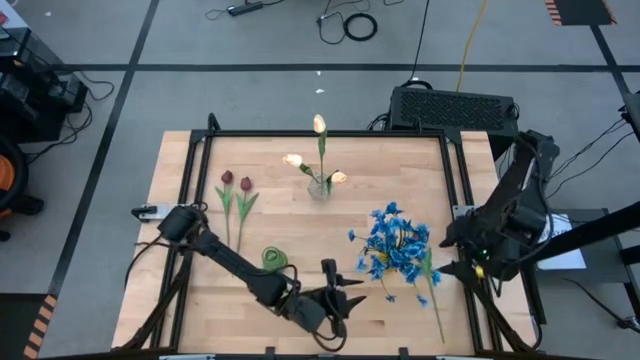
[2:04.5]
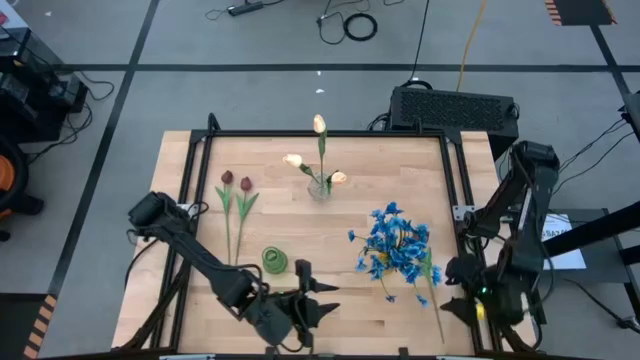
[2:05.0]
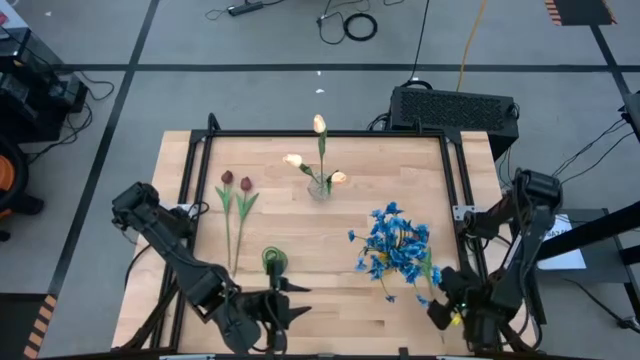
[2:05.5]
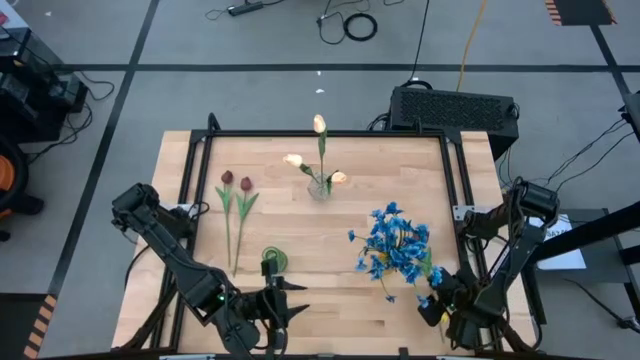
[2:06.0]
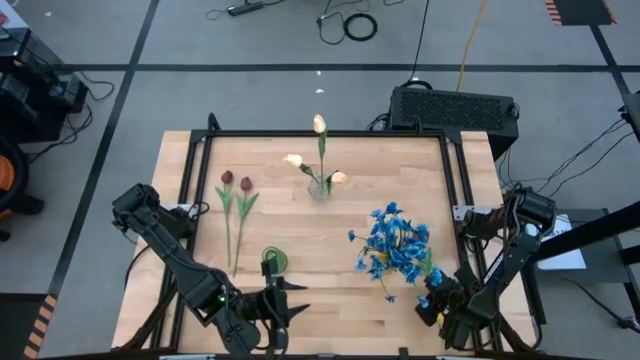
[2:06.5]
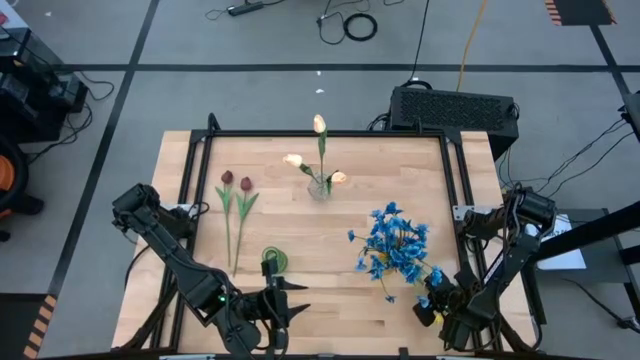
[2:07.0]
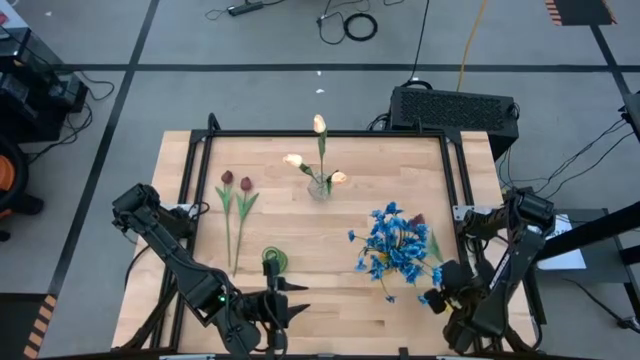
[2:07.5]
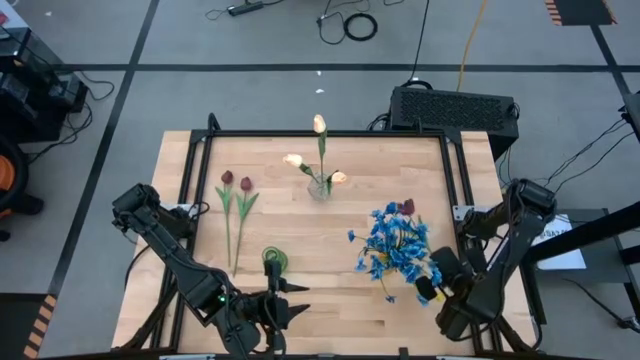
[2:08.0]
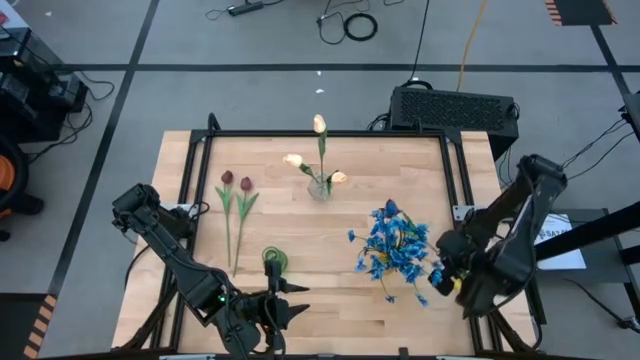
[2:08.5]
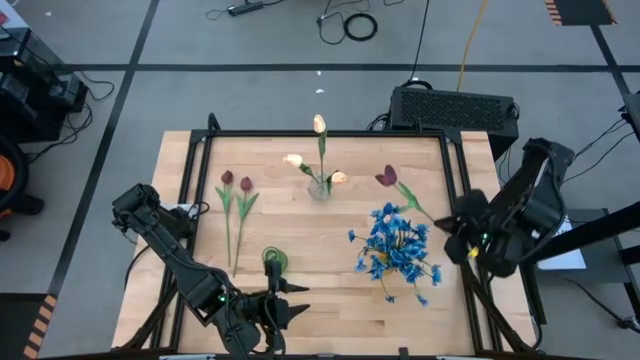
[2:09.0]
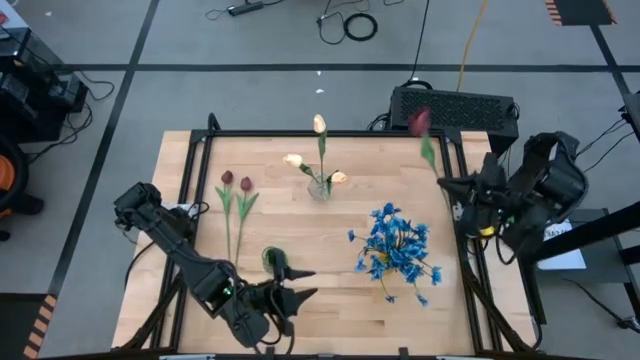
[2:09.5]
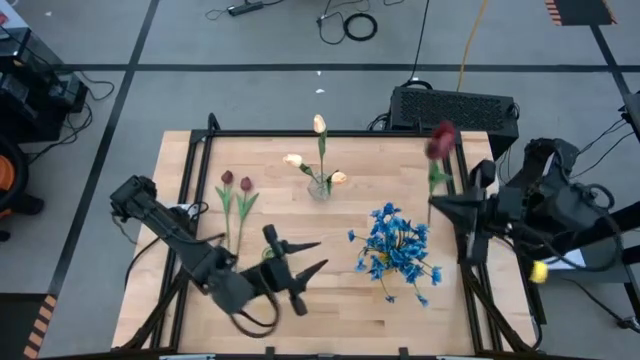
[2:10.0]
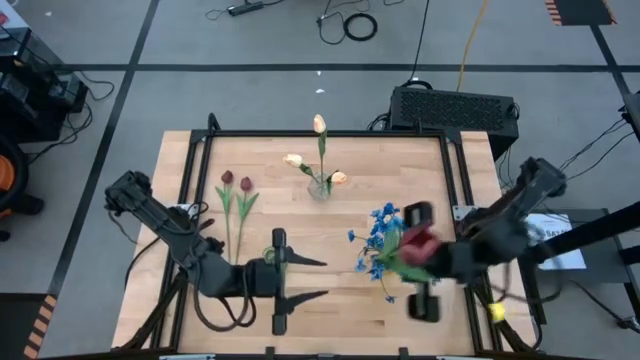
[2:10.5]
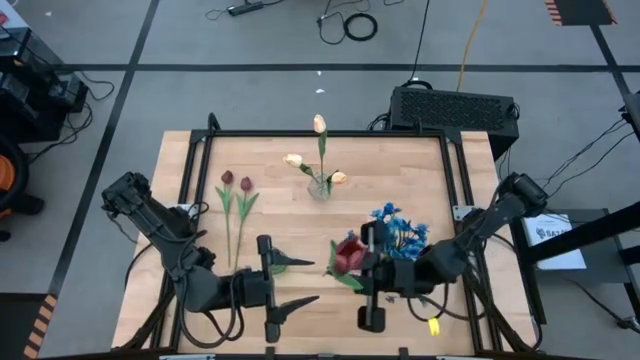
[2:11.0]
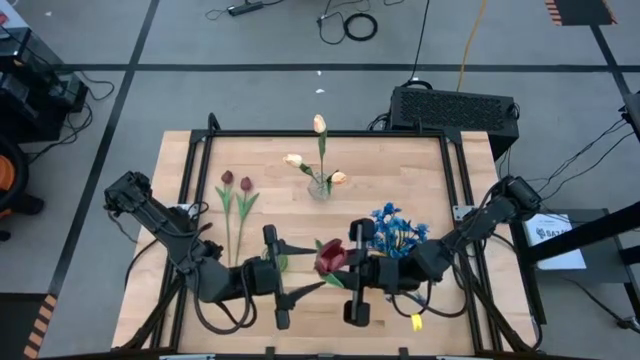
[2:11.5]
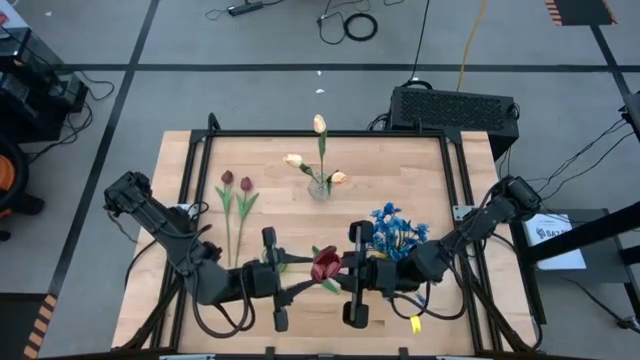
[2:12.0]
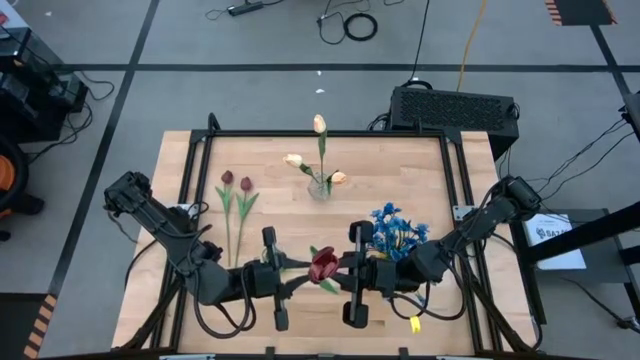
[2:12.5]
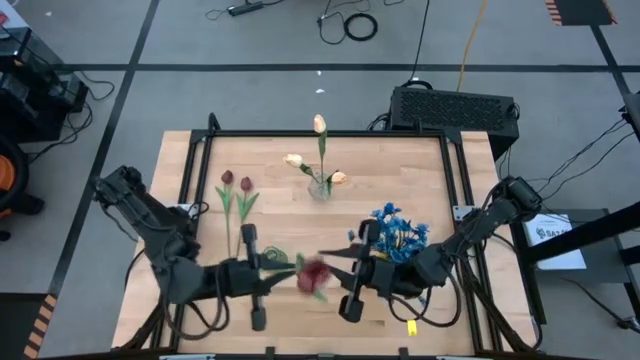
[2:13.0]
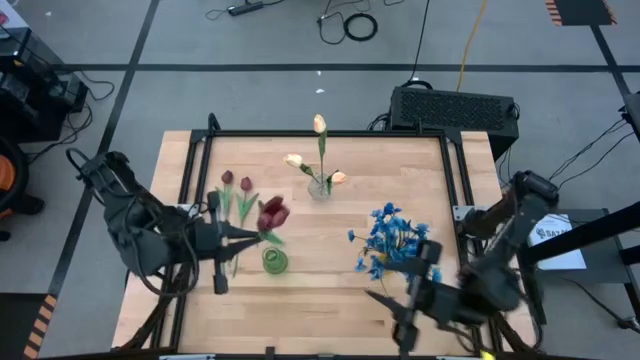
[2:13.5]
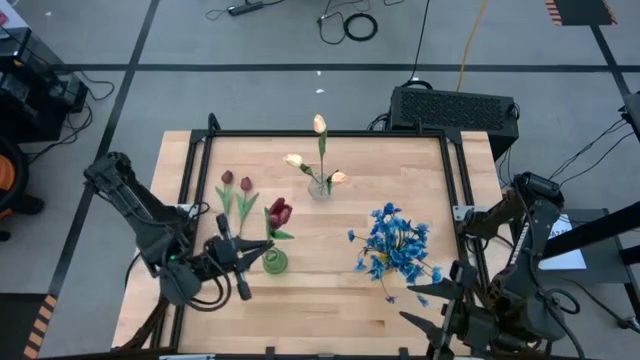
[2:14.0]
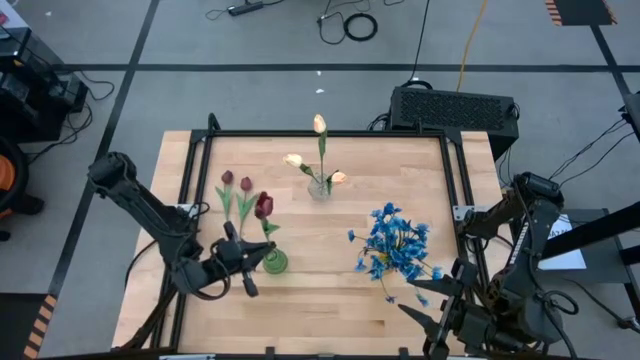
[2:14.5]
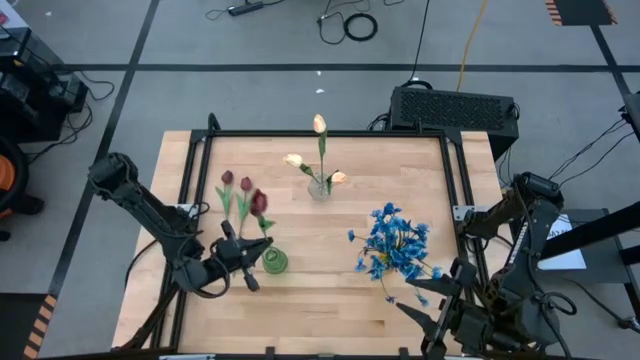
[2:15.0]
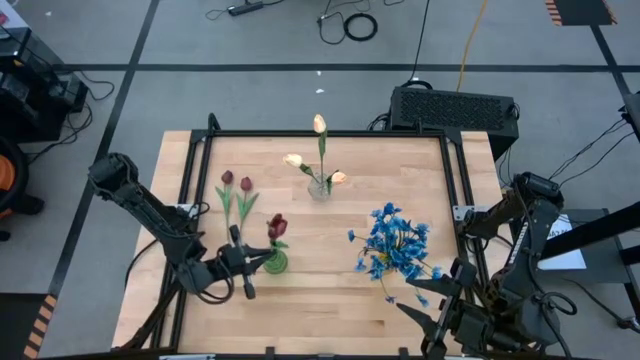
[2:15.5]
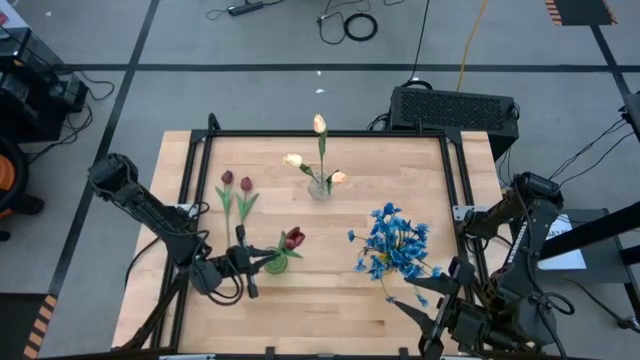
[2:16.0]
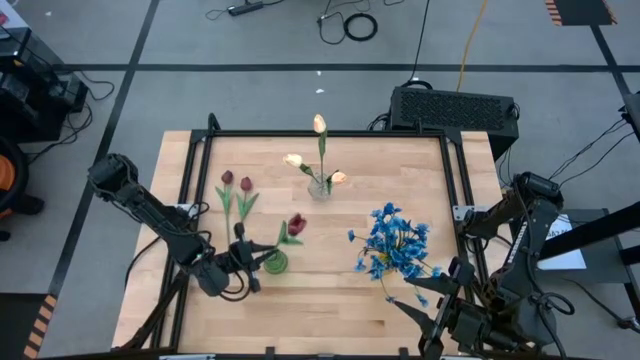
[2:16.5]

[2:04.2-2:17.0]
Task: Sort flowers into vase by color
Put the bottom red flower into the green vase

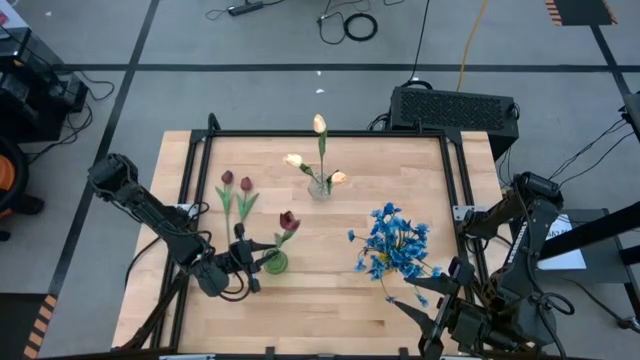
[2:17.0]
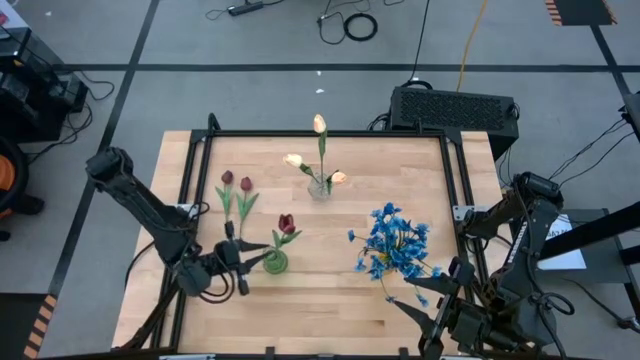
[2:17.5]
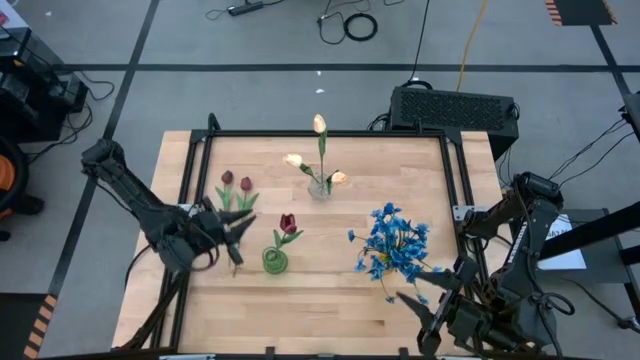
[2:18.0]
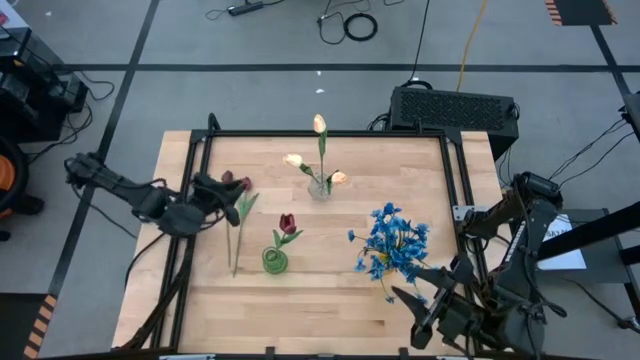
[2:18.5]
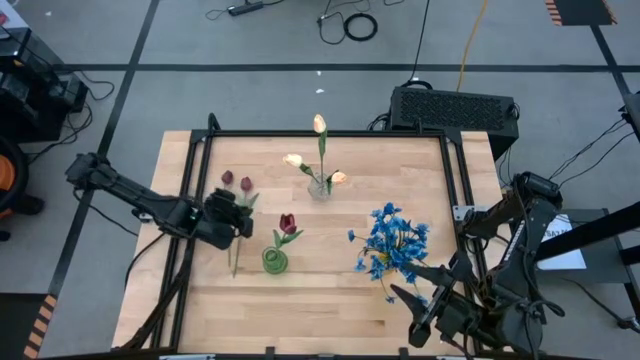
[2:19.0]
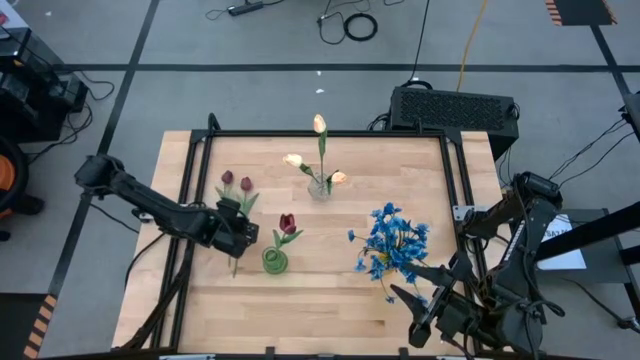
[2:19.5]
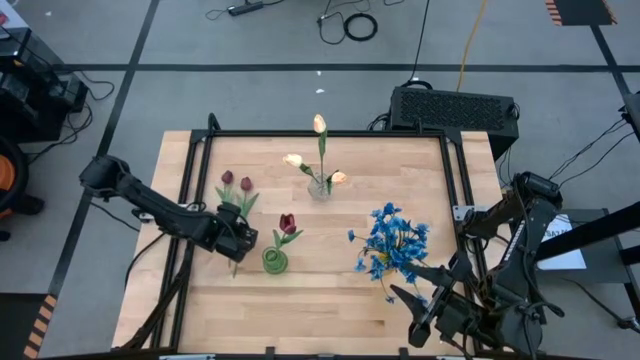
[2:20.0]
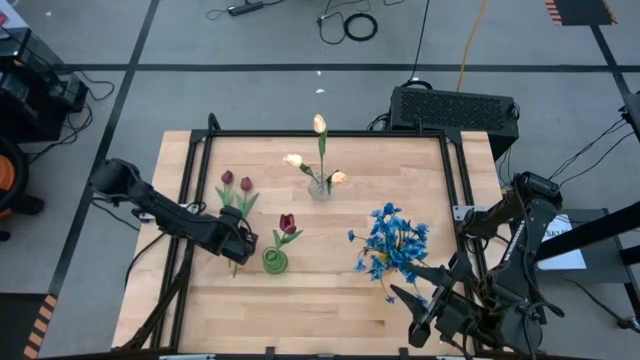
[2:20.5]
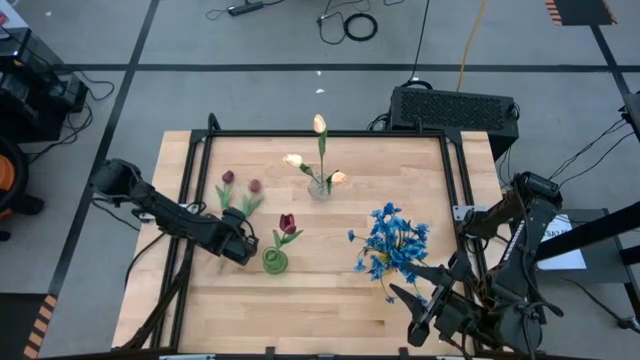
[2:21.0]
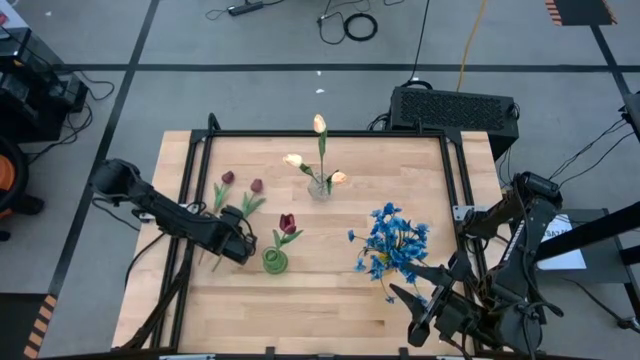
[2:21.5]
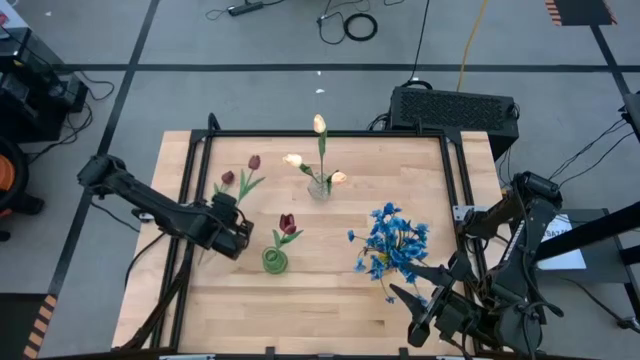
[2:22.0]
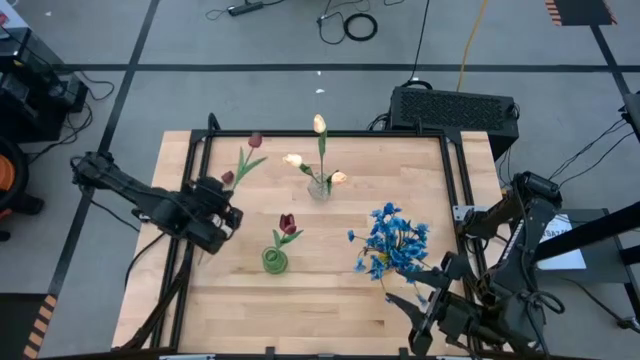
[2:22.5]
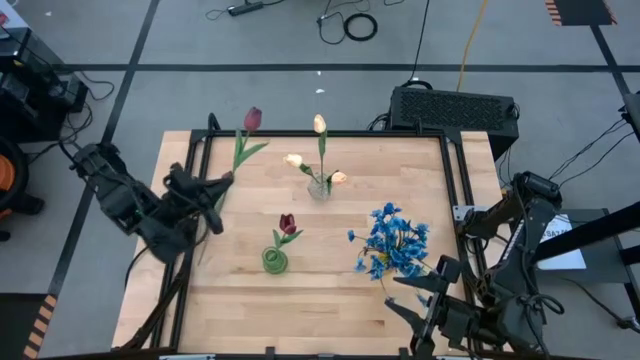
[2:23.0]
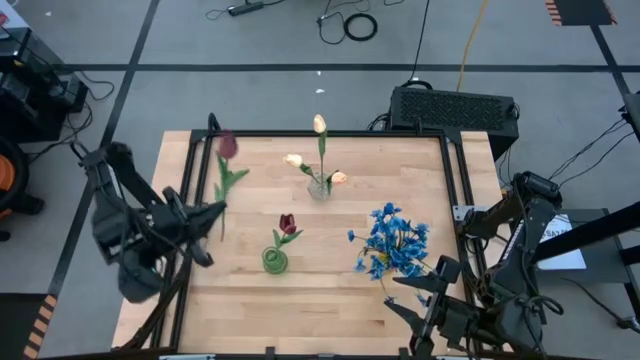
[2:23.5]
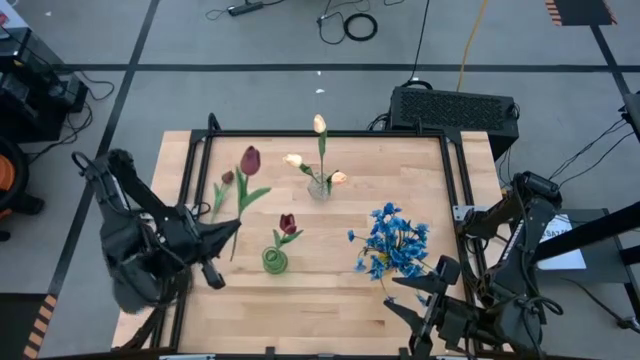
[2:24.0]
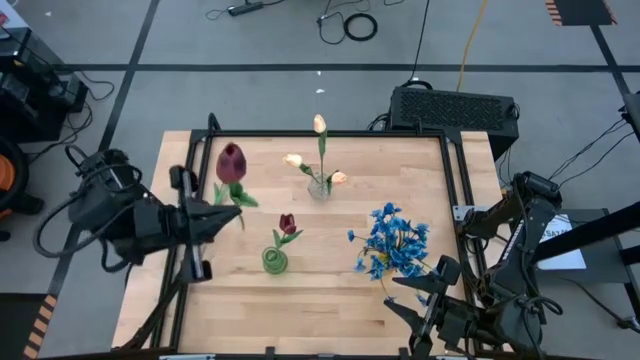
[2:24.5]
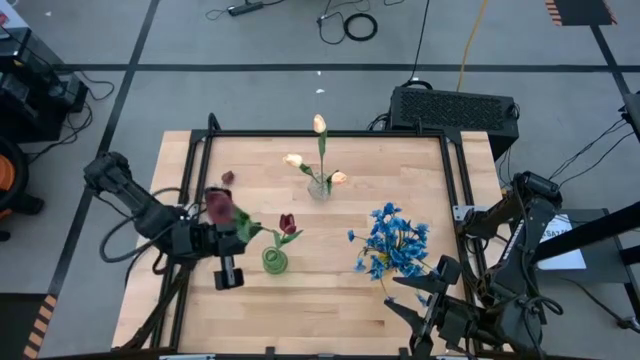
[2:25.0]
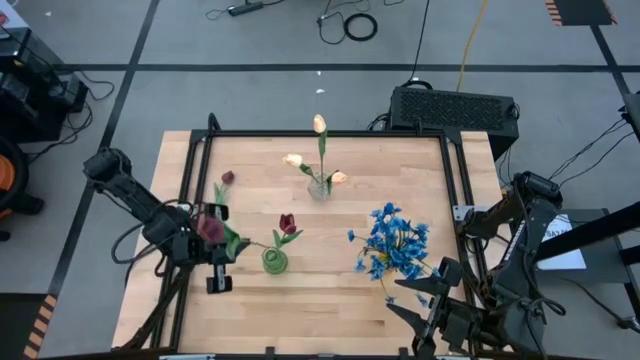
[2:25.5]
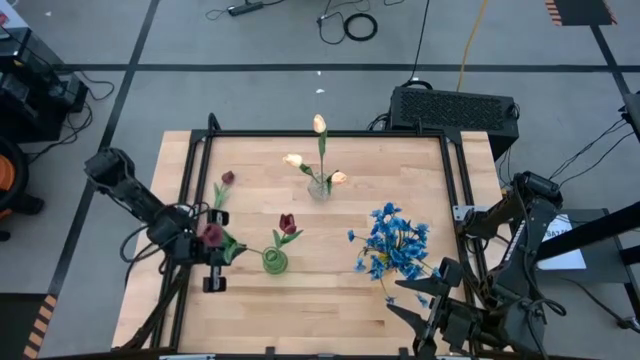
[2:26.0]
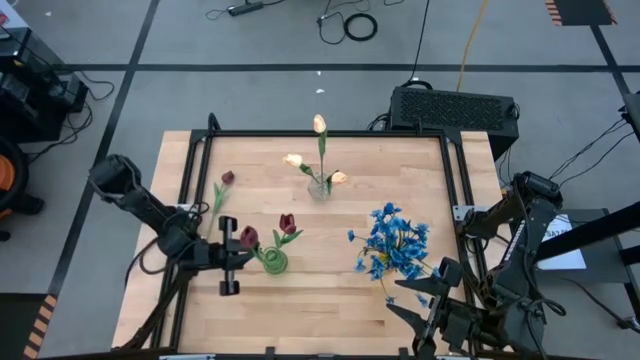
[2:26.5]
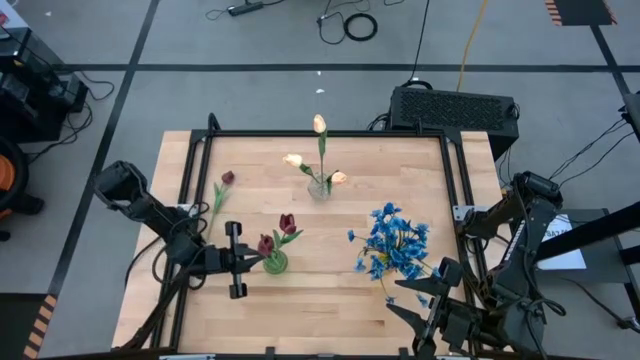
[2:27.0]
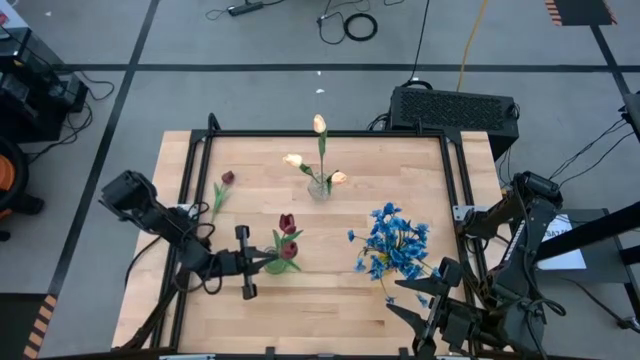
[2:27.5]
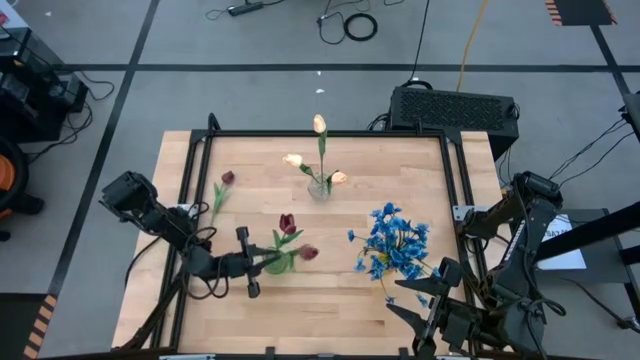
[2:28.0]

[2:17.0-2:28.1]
Put the right red flower into the green vase
